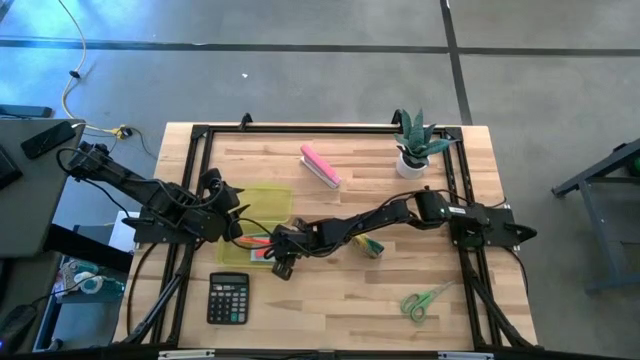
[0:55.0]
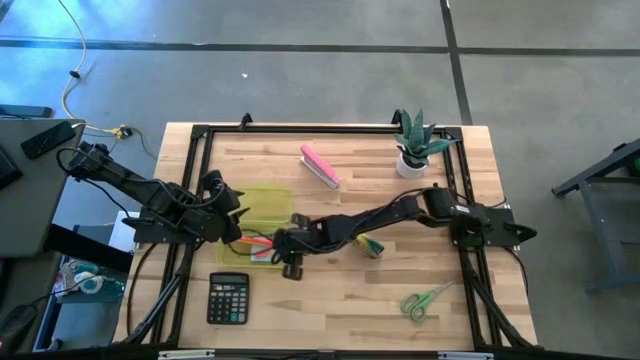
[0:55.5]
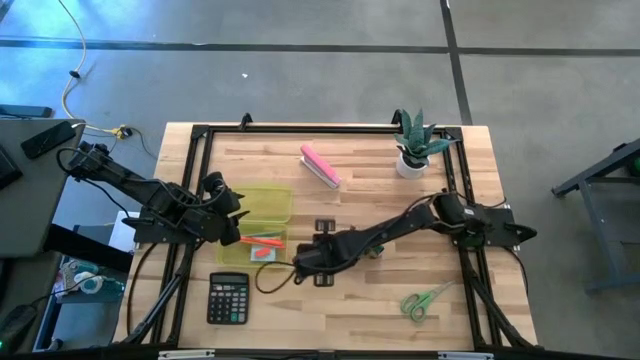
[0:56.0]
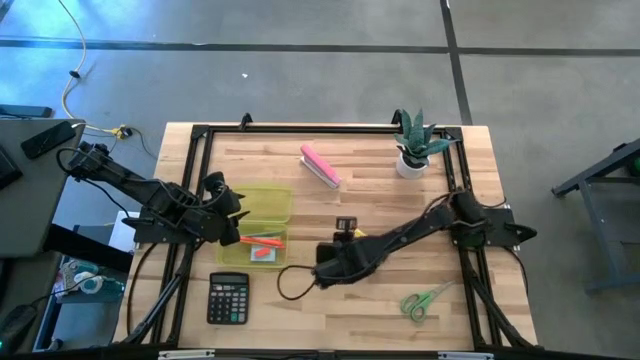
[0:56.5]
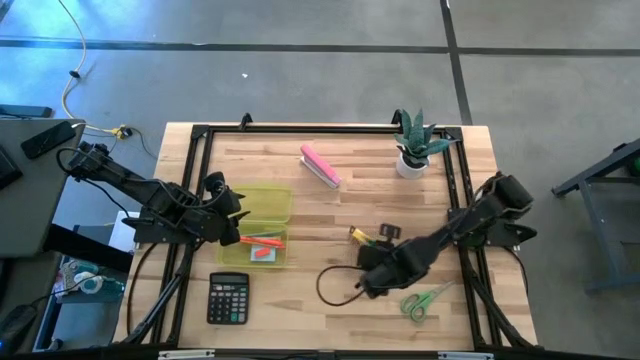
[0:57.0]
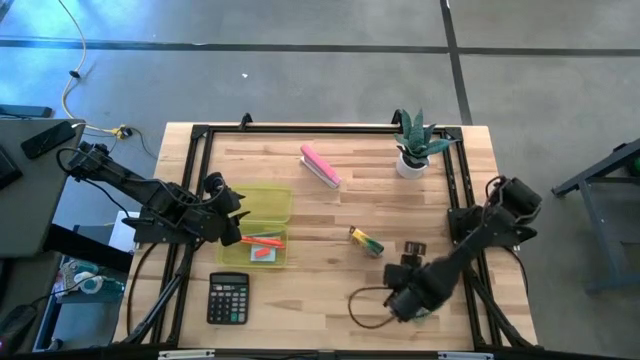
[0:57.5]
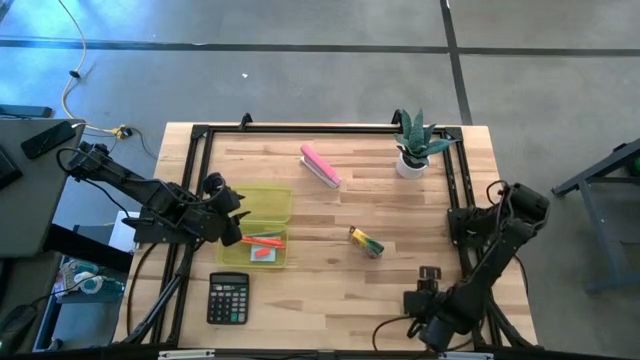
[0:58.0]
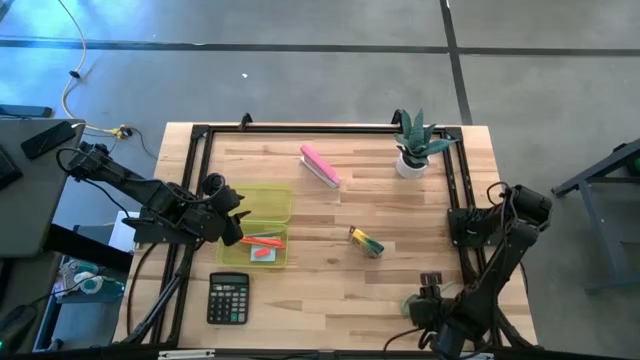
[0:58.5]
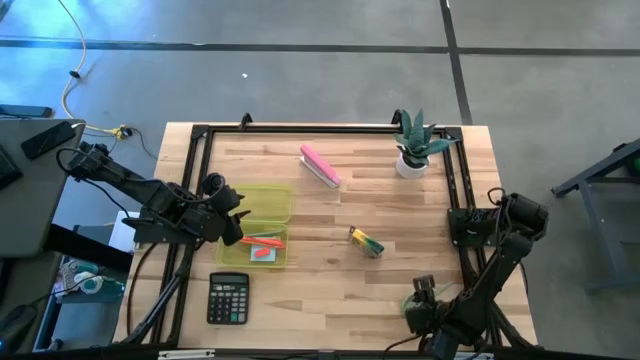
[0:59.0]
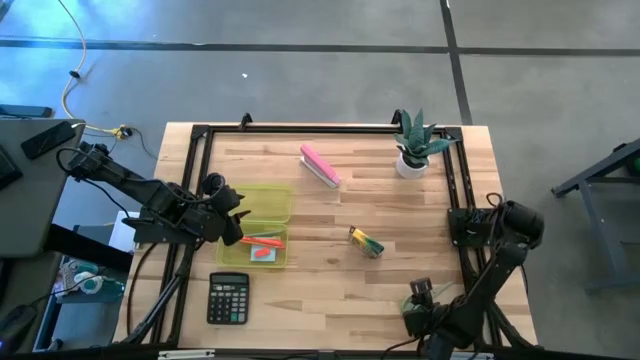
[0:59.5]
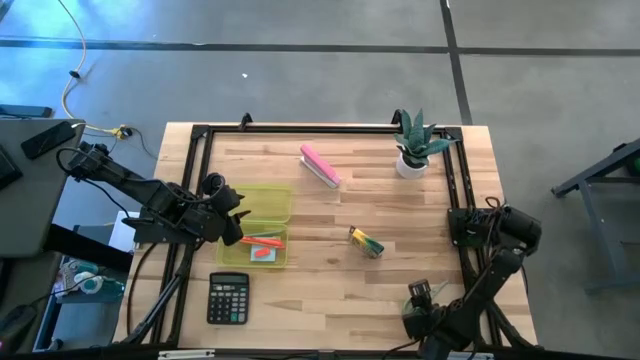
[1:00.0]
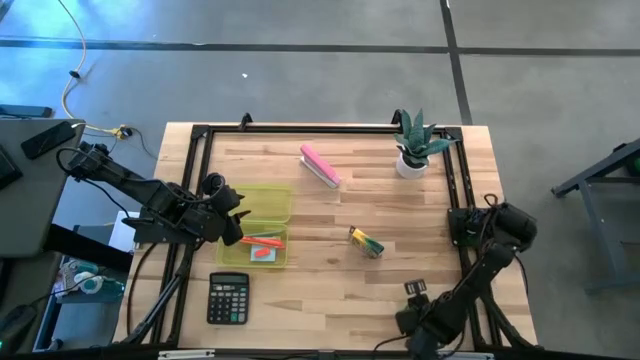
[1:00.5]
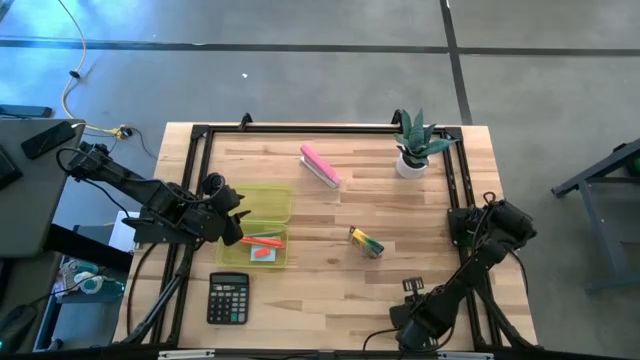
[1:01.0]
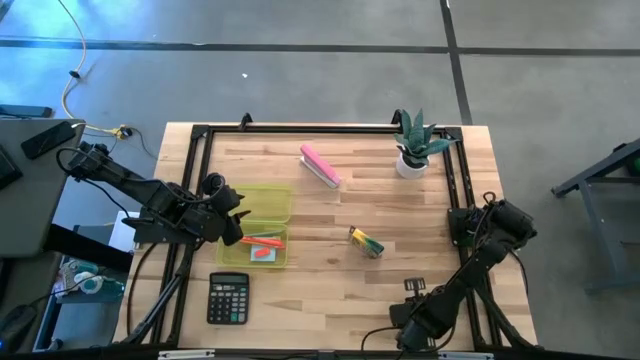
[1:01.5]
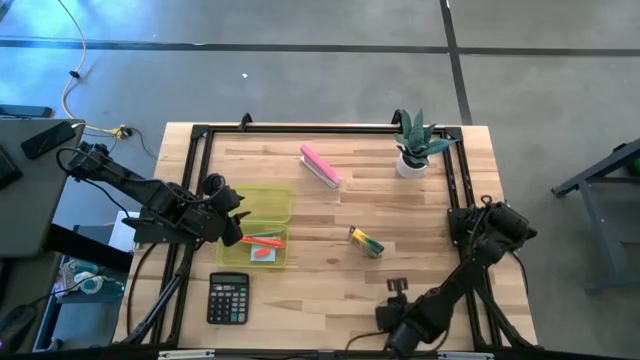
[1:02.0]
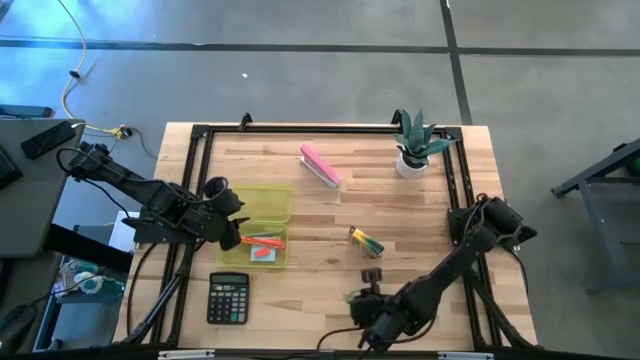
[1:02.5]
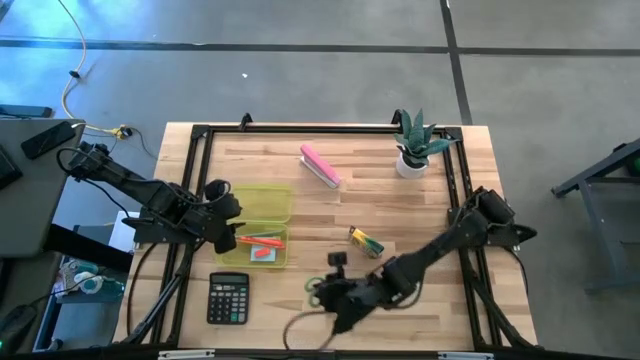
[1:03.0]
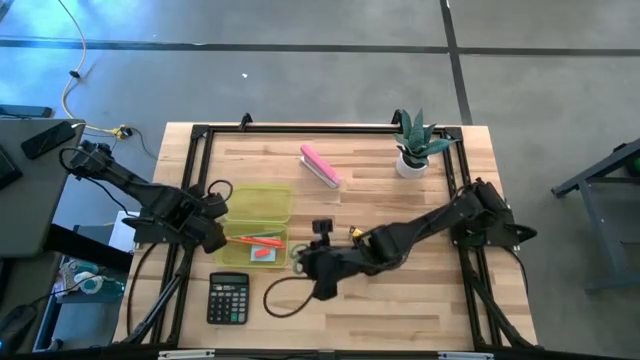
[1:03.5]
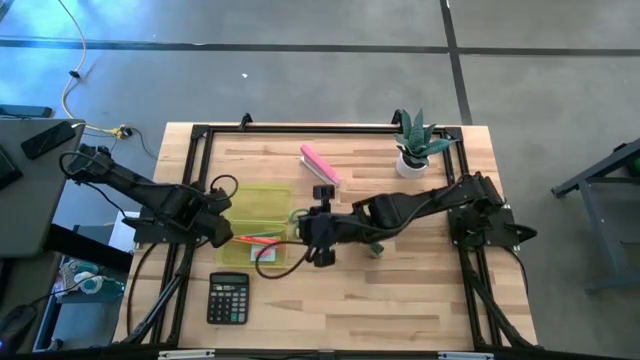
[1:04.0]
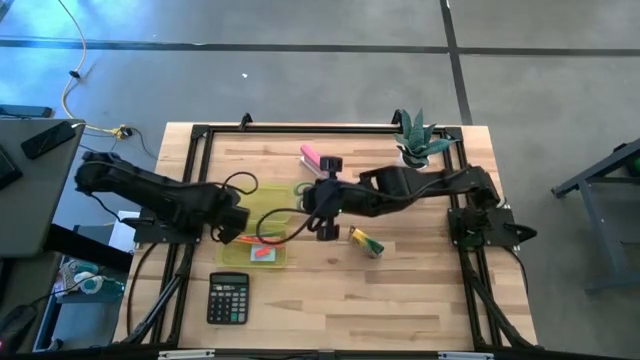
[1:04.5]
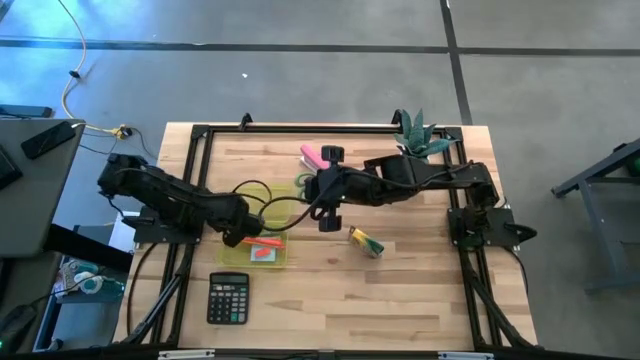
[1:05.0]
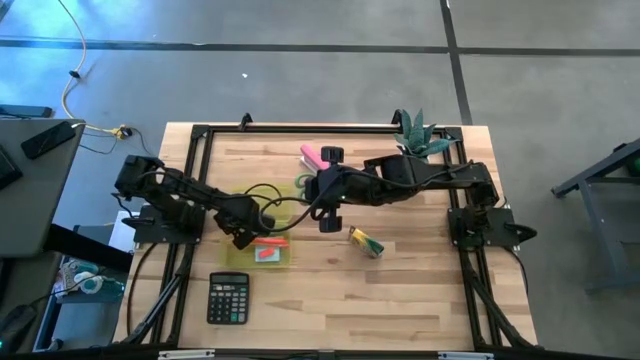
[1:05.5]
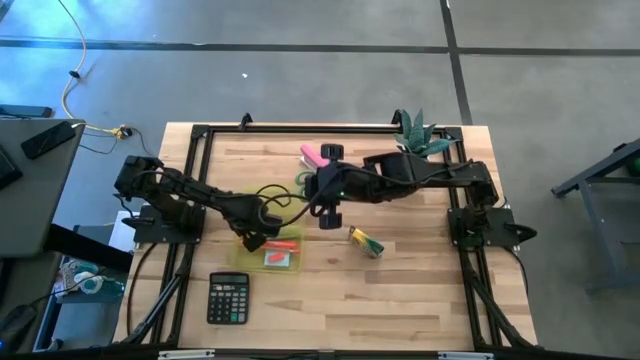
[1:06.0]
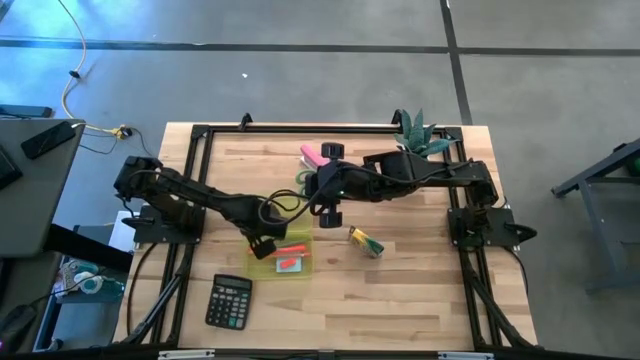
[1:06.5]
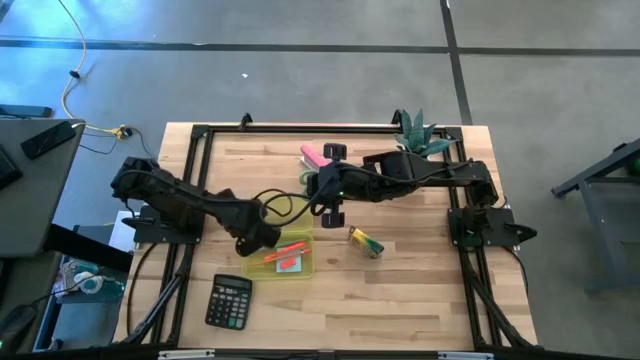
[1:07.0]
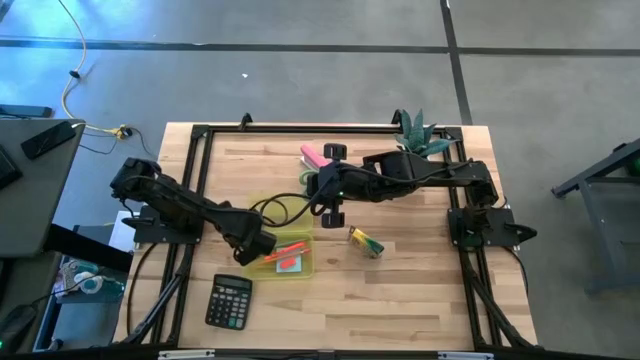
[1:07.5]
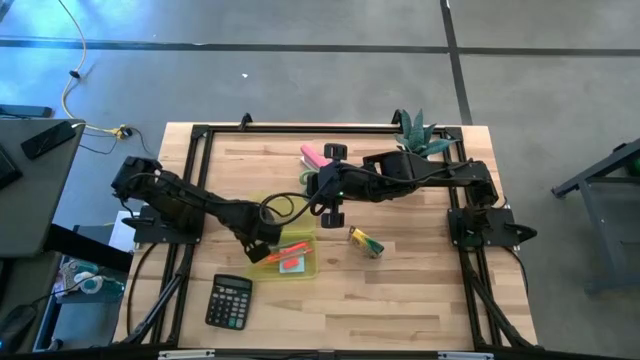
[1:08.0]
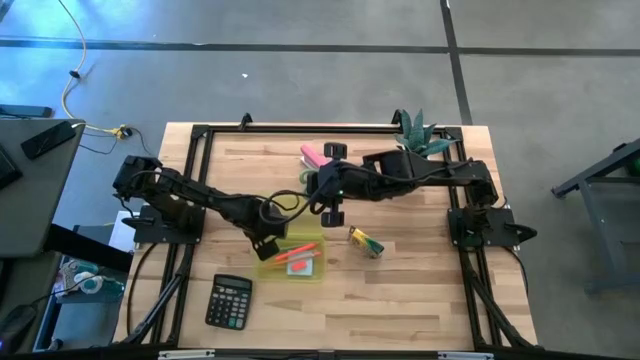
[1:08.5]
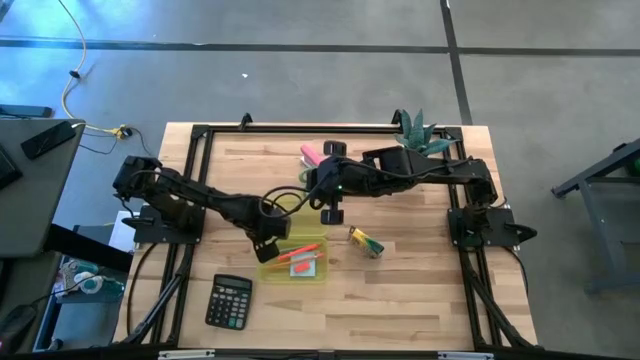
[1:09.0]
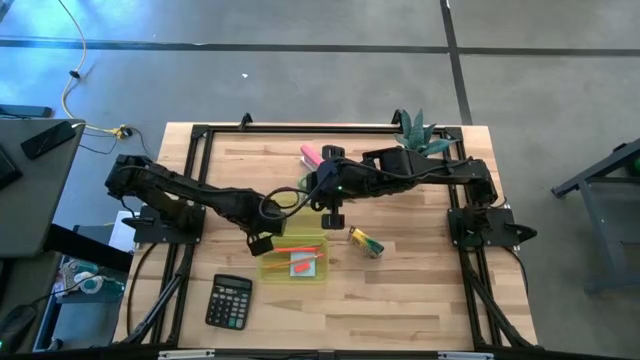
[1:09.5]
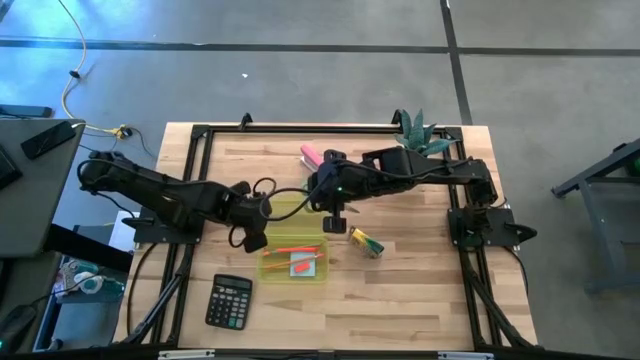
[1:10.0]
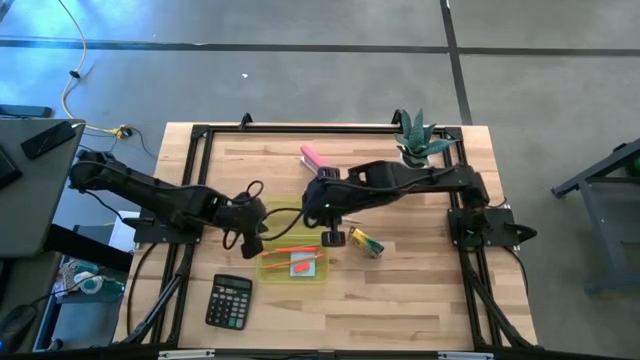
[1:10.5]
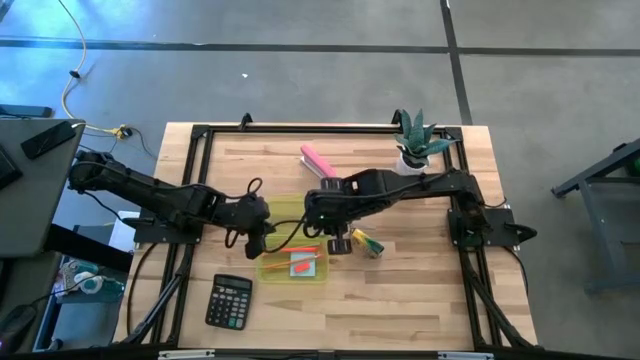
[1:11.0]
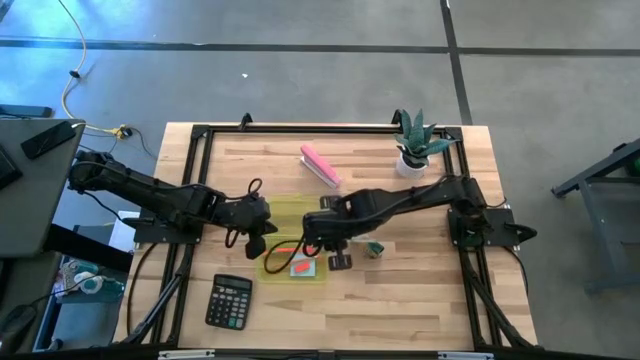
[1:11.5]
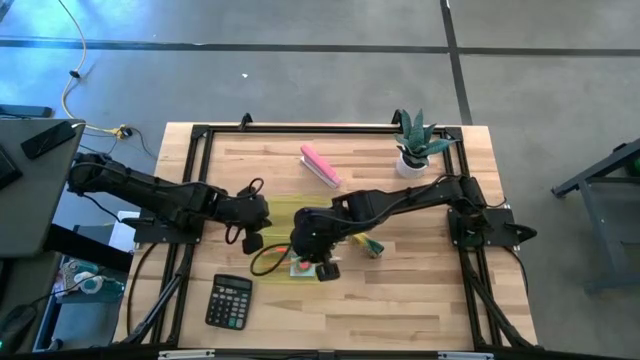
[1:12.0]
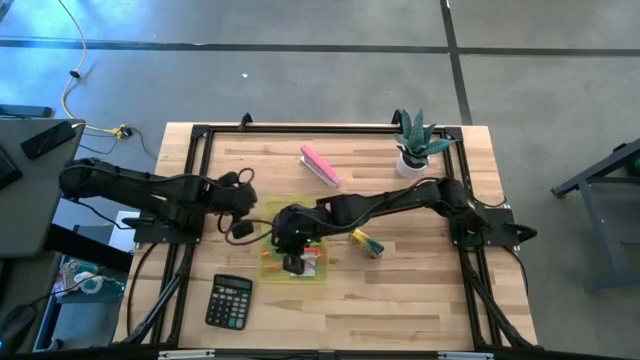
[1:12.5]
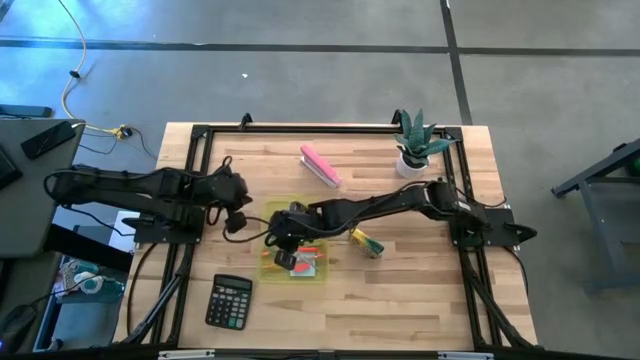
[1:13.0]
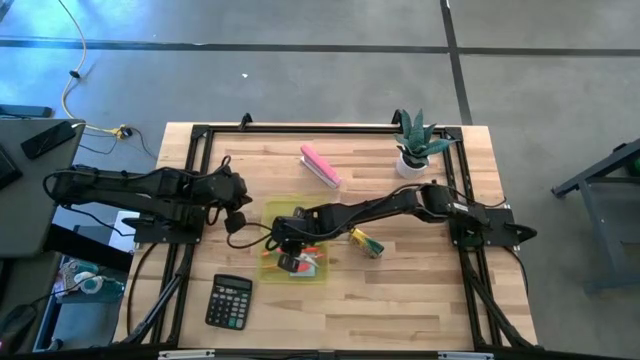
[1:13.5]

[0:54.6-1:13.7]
Task: Pack school essentials
Put the green scissors into the yellow supply box
